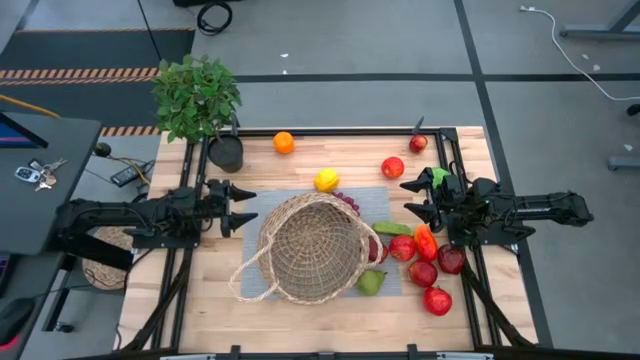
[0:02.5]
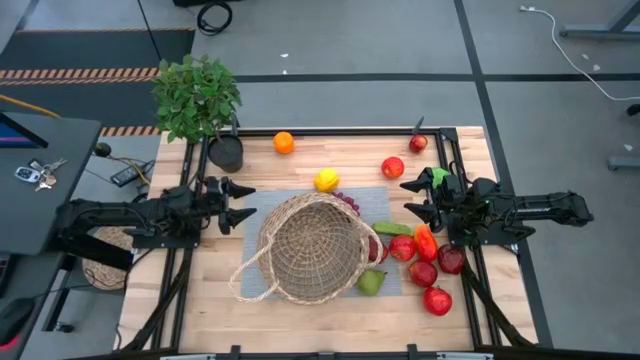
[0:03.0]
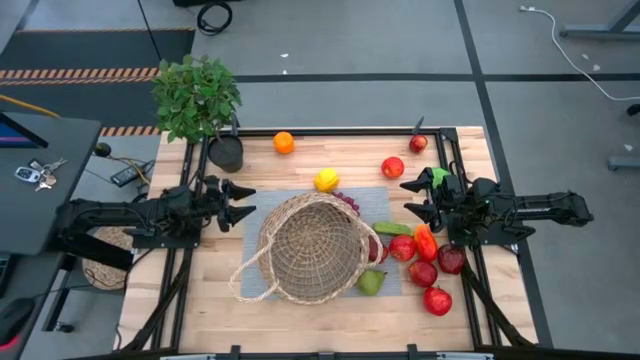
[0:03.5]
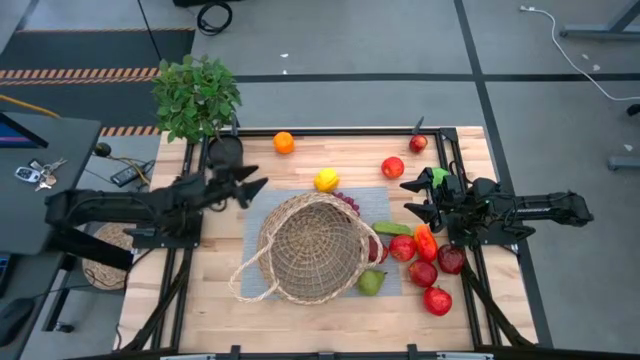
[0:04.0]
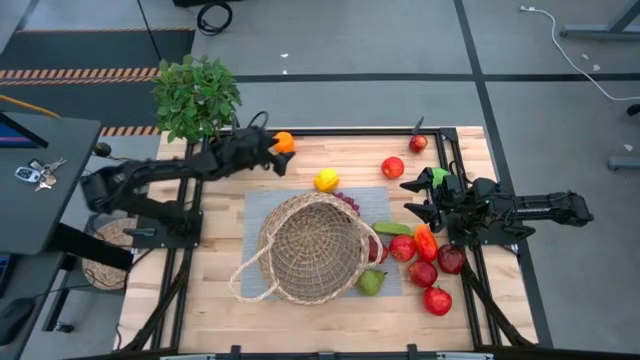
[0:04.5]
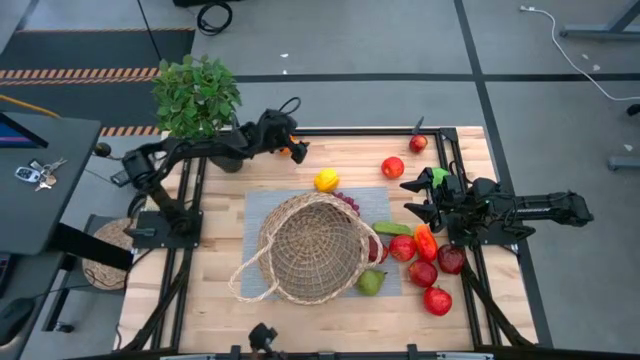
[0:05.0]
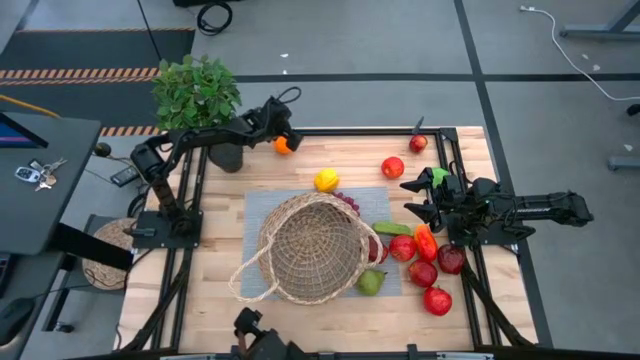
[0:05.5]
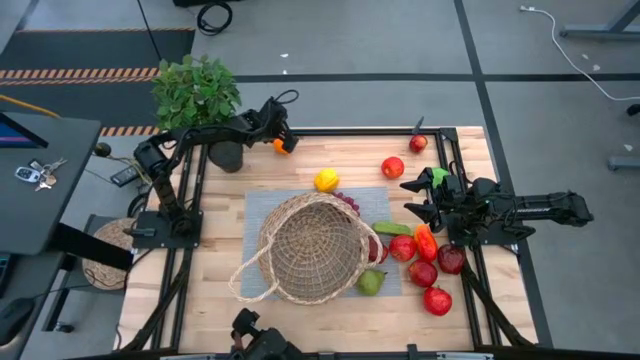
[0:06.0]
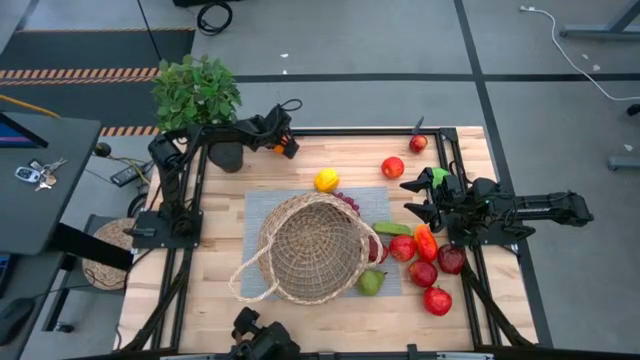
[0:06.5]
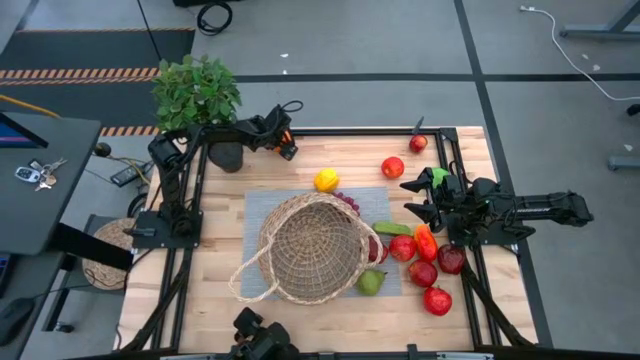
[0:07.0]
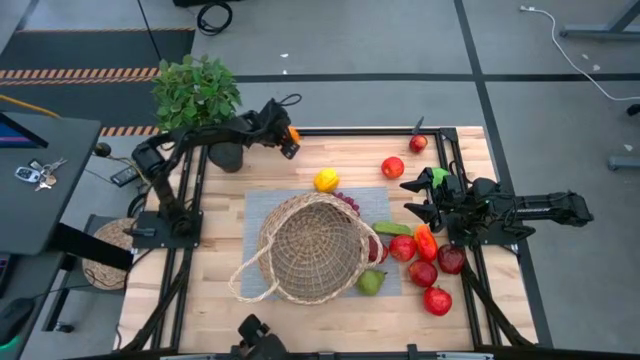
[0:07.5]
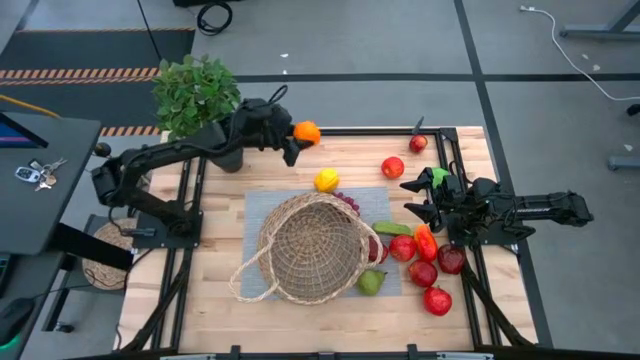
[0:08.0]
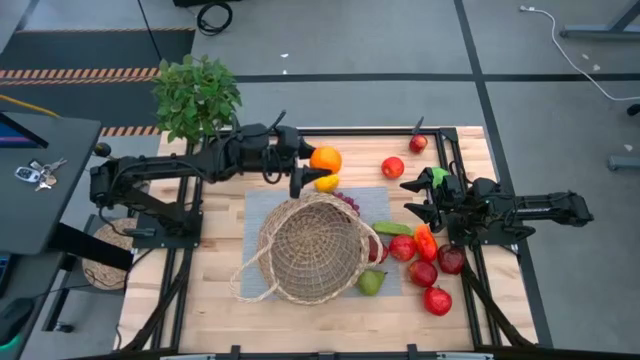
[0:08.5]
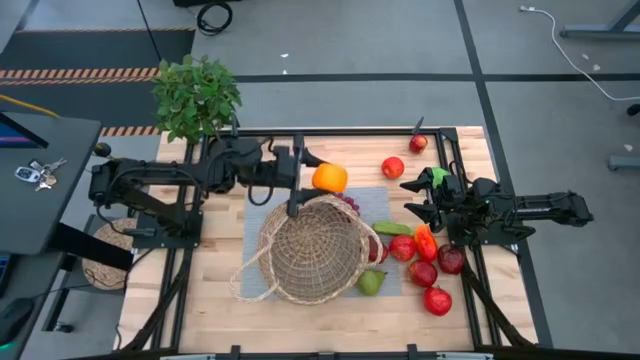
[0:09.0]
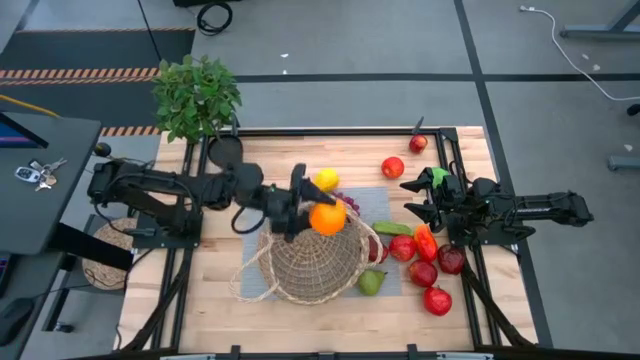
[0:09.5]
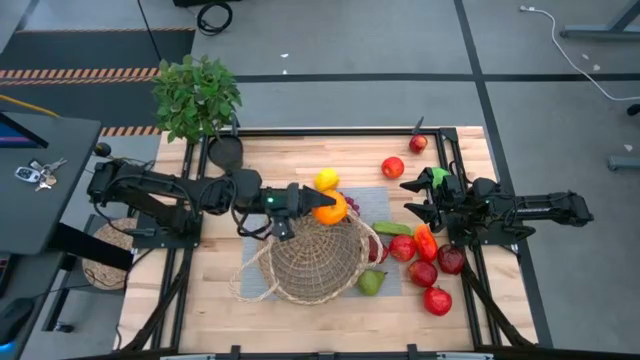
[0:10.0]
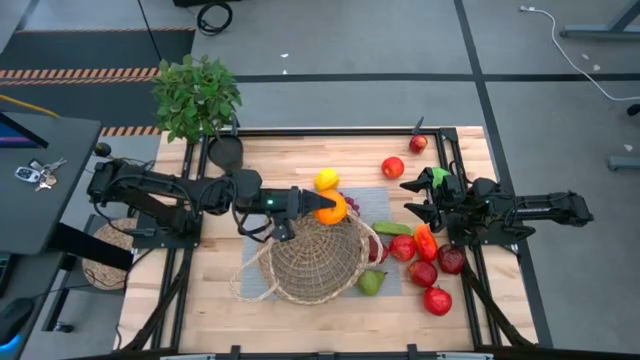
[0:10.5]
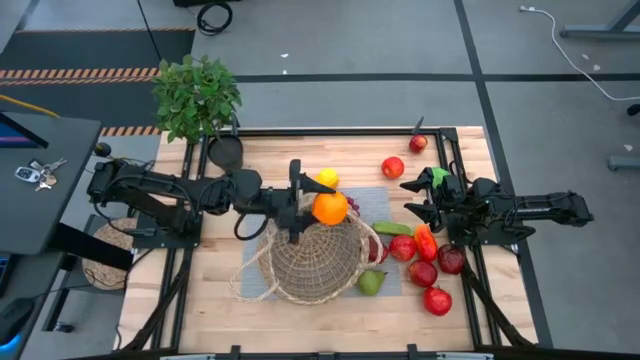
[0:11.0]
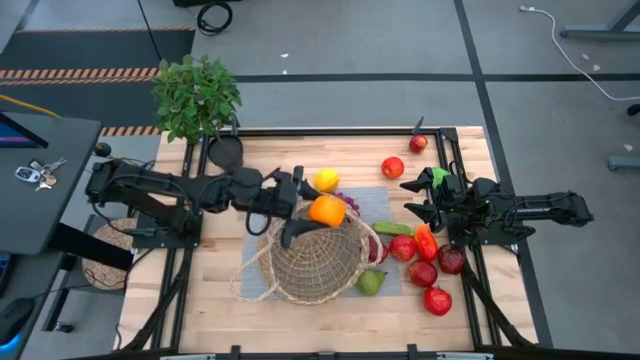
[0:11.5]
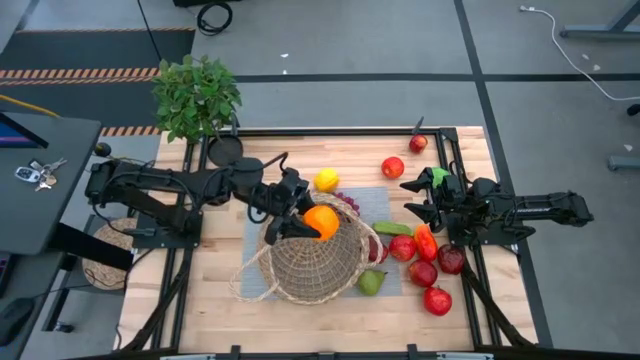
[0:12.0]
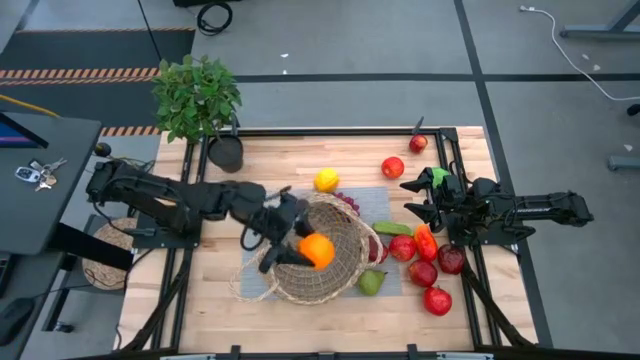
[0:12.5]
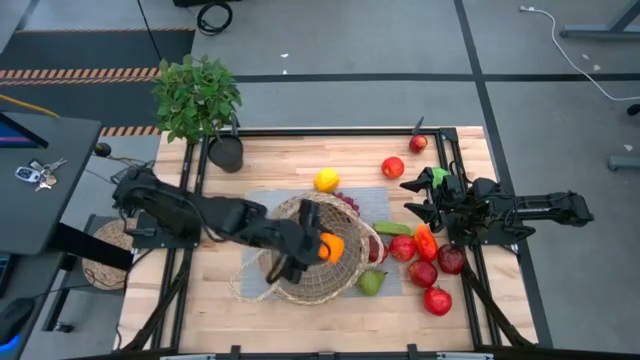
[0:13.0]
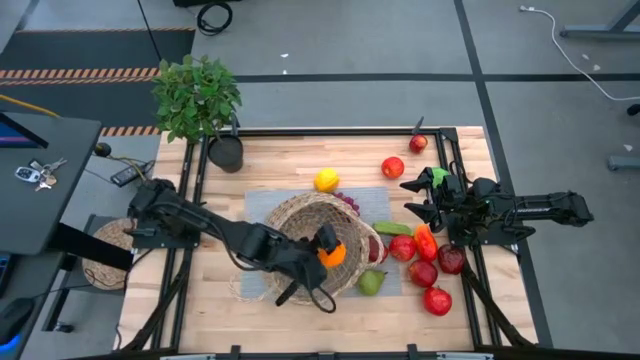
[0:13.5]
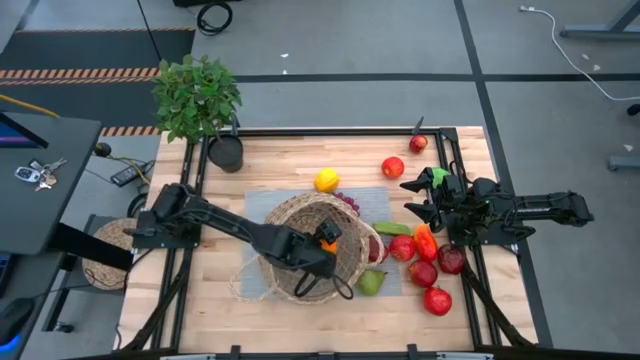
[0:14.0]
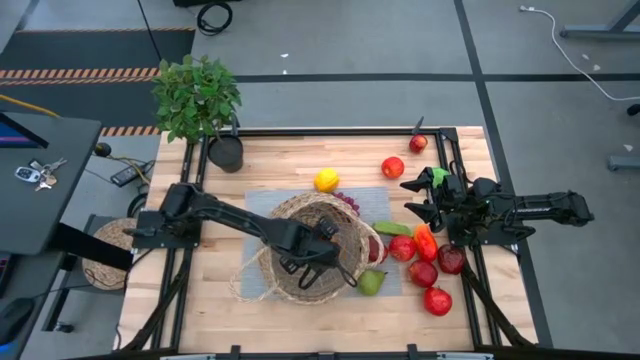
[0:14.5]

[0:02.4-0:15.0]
Task: Build produce basket
Put the orange into the brown basket

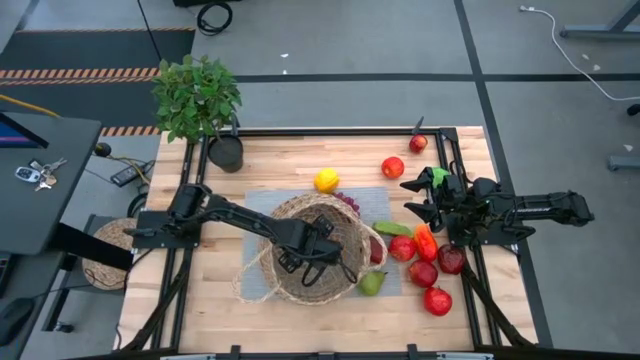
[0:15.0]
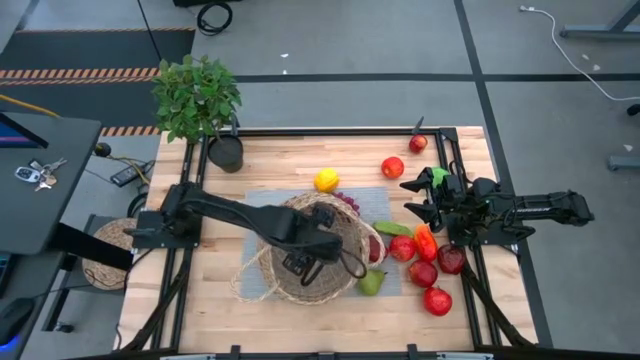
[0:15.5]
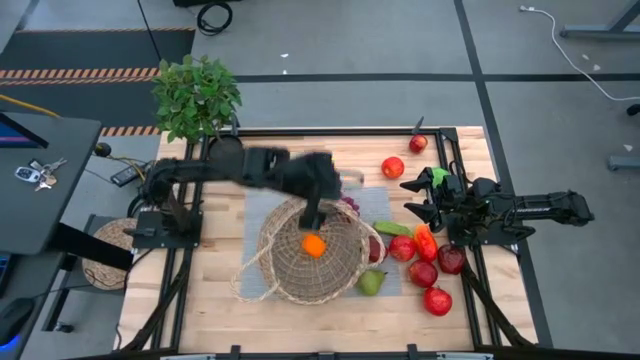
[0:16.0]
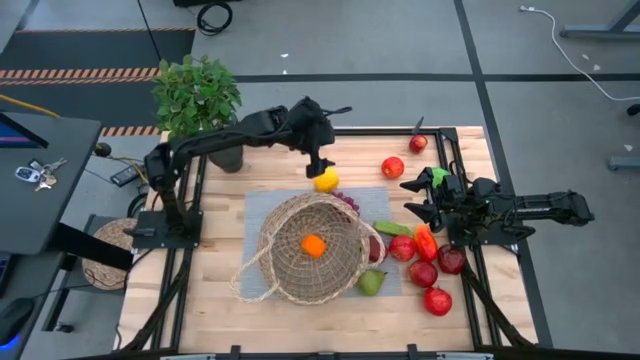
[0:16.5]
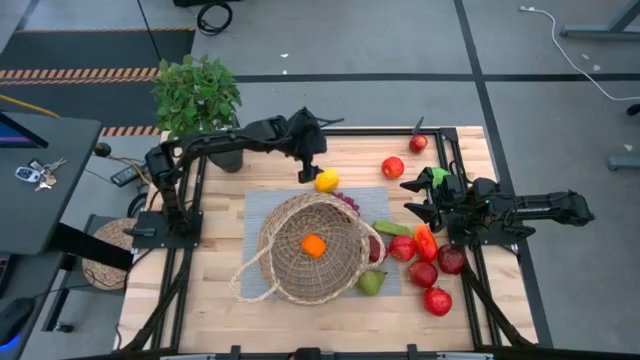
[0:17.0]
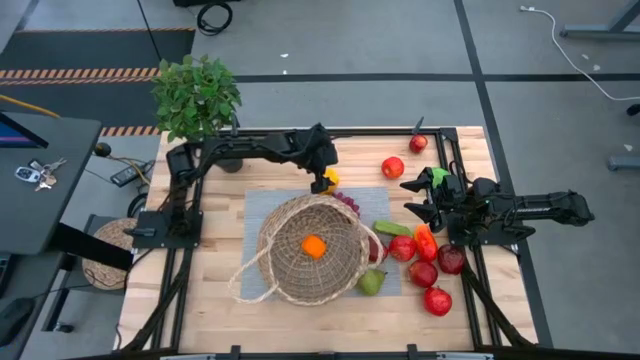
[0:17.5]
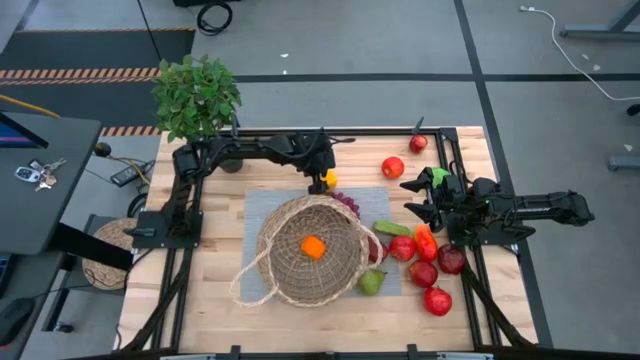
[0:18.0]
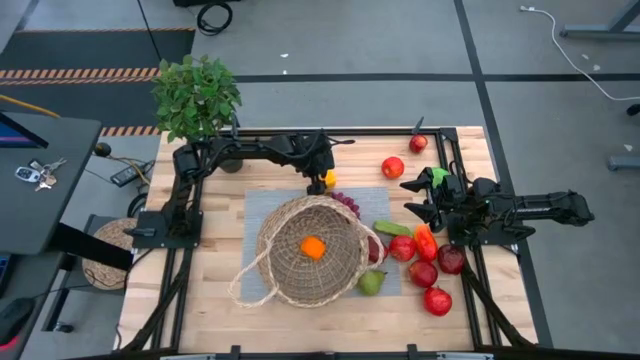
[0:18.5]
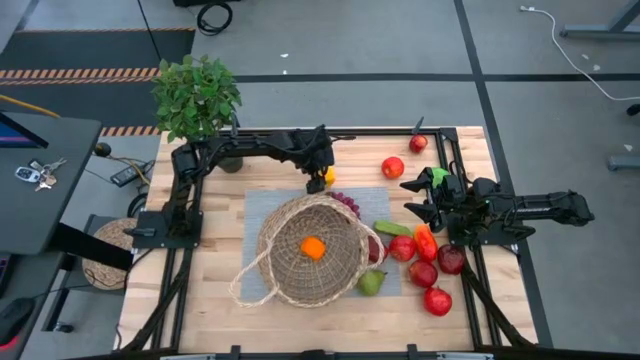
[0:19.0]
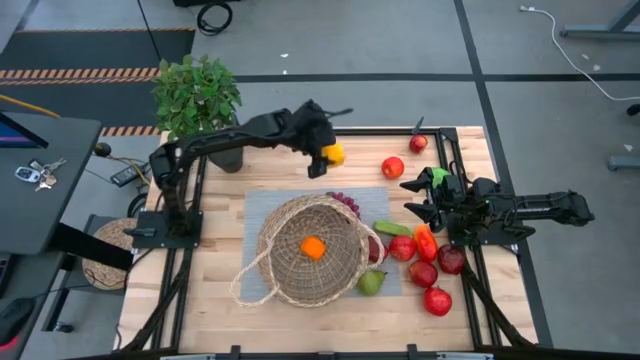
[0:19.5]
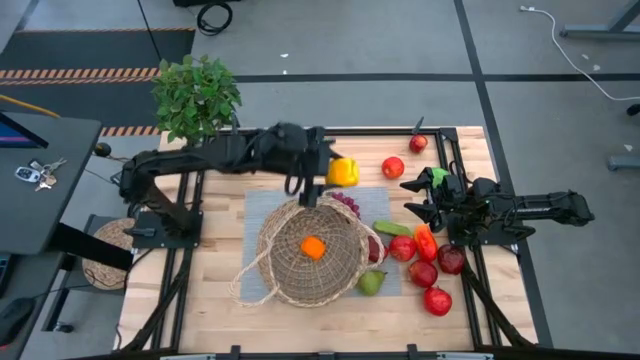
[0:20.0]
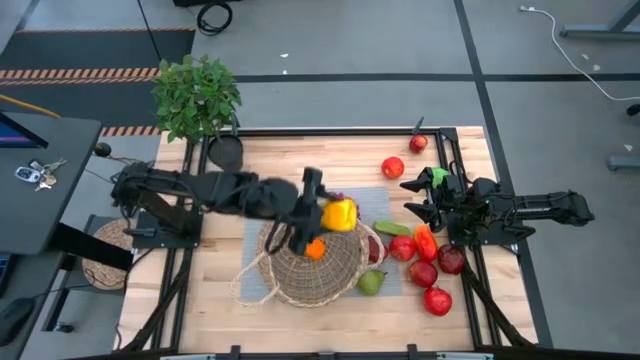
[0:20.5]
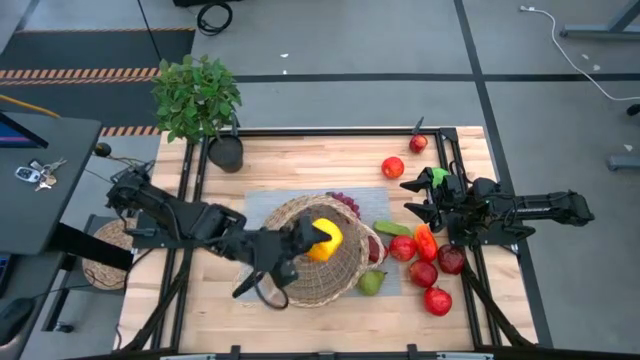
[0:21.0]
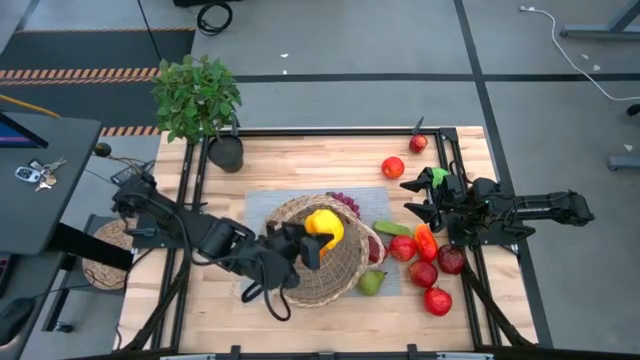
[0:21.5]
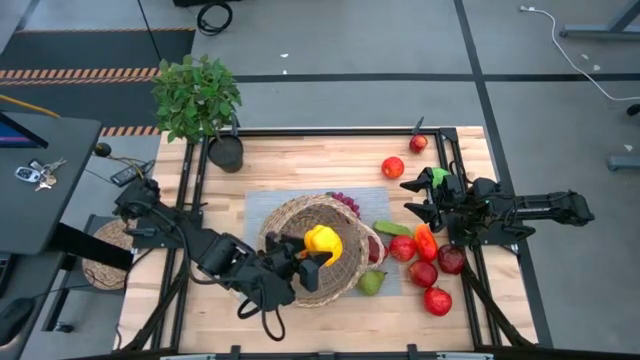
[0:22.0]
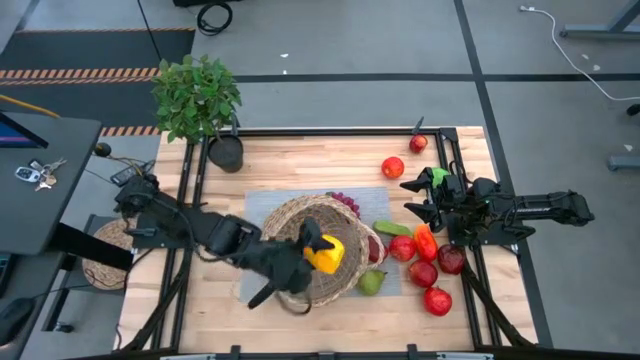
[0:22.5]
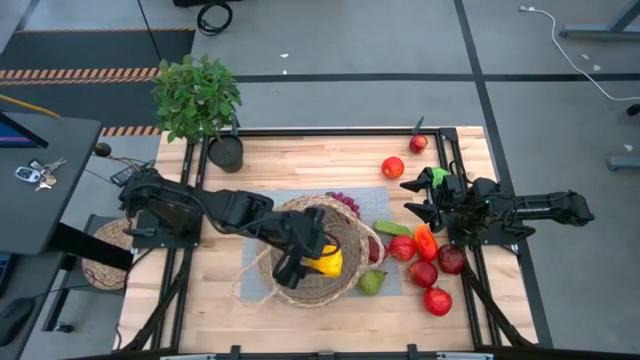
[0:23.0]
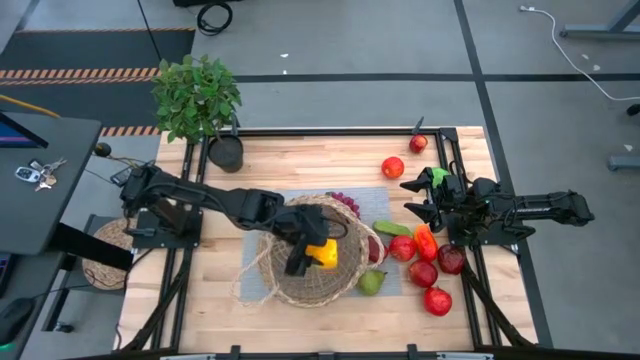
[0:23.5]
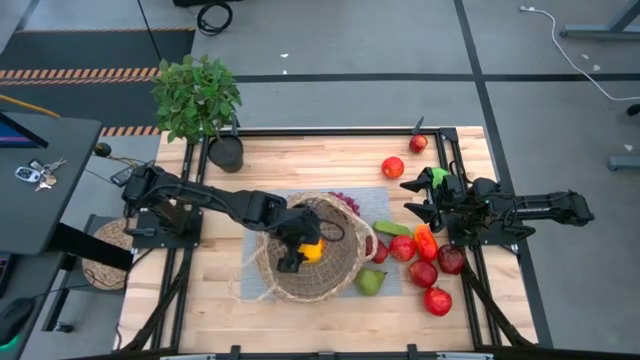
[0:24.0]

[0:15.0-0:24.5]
Put the yellow bell pepper into the brown basket
